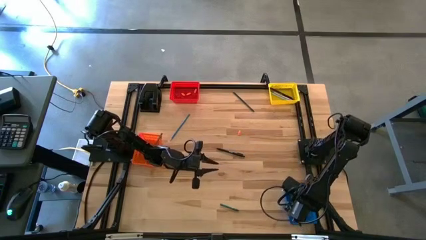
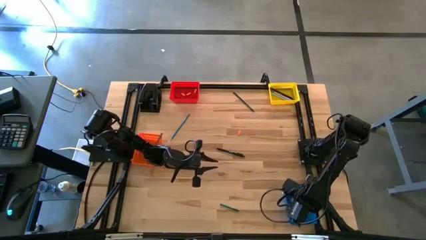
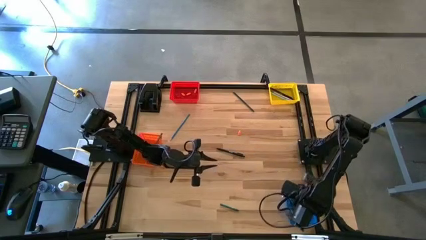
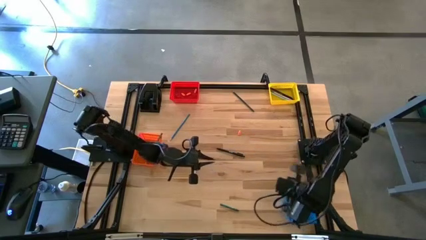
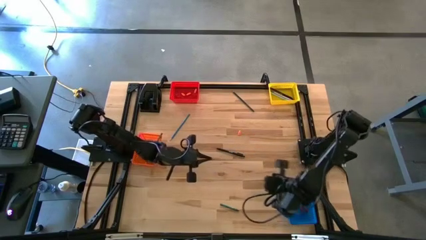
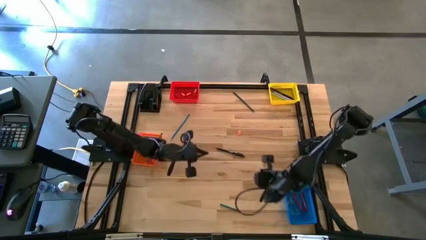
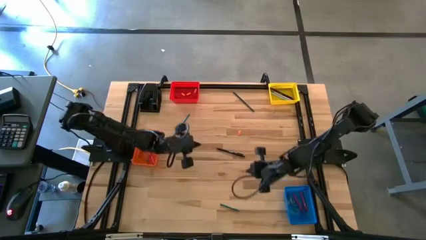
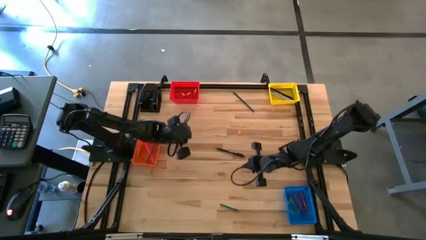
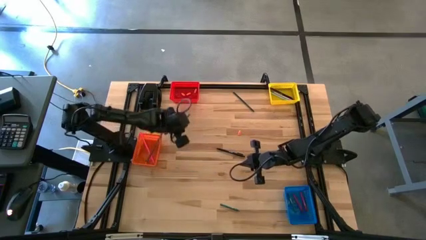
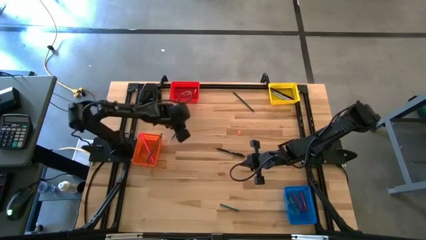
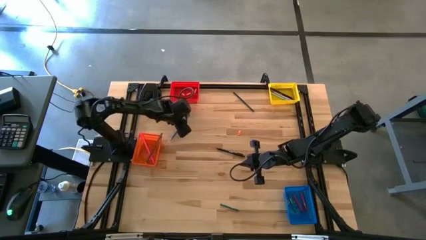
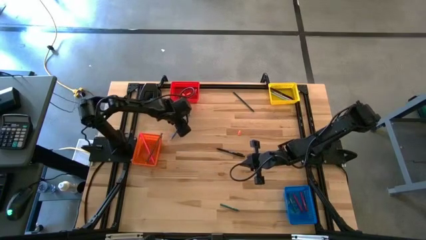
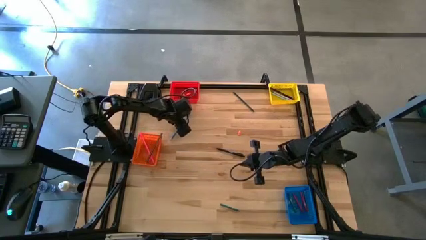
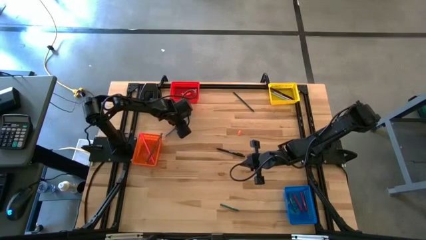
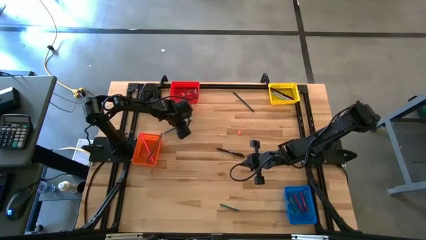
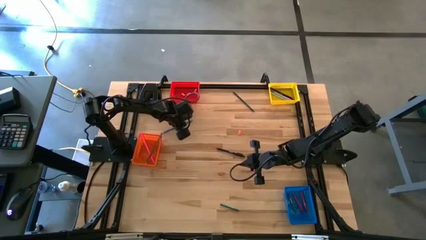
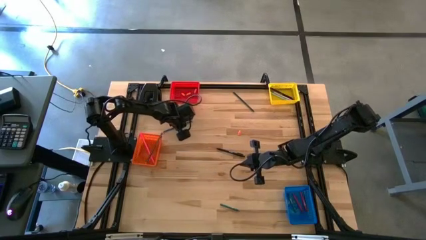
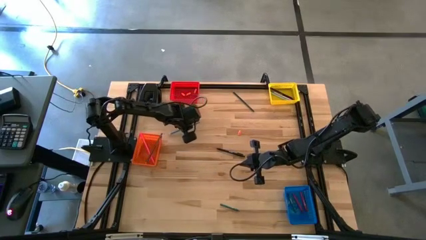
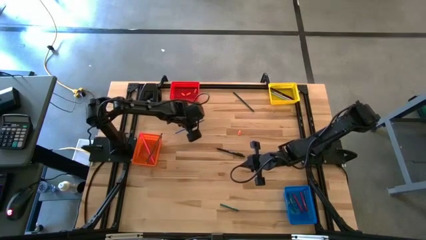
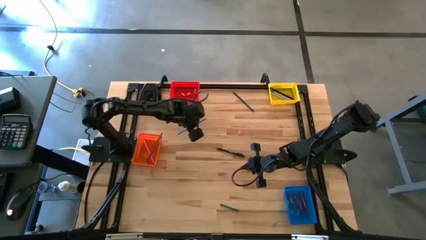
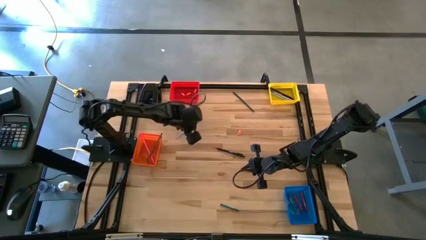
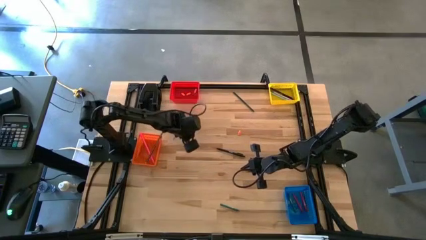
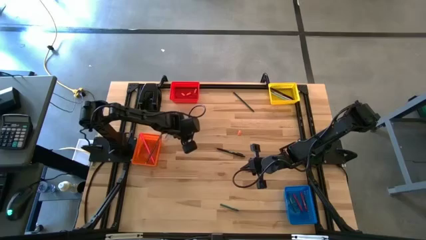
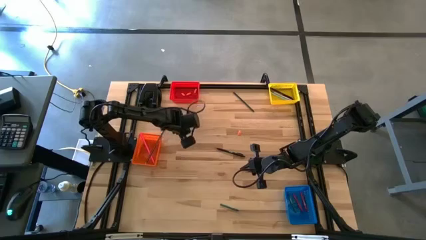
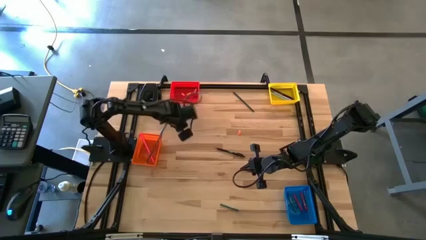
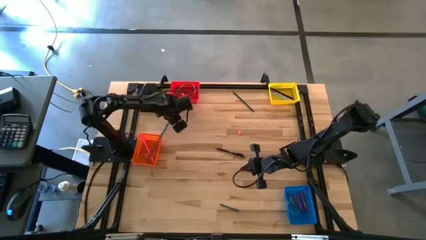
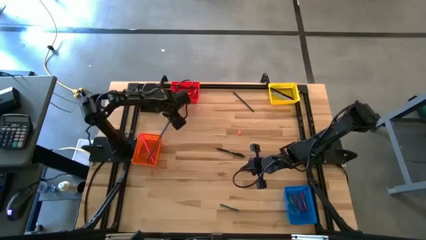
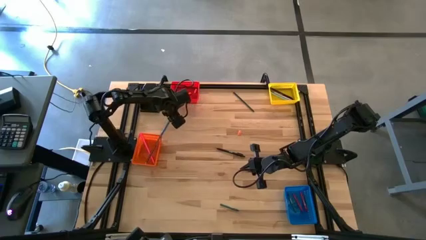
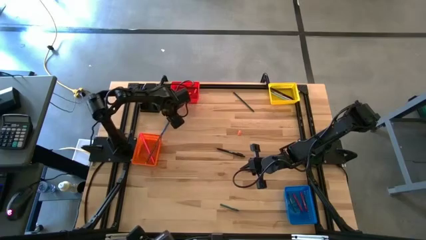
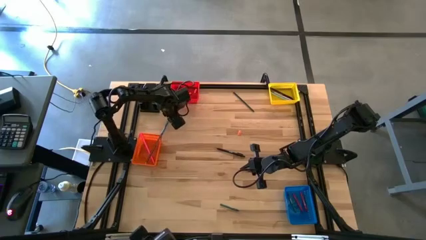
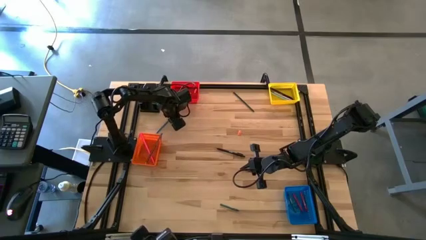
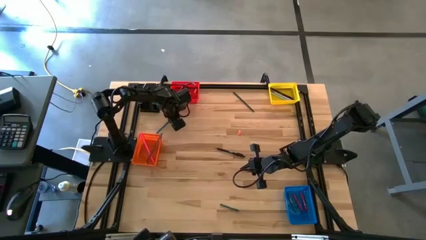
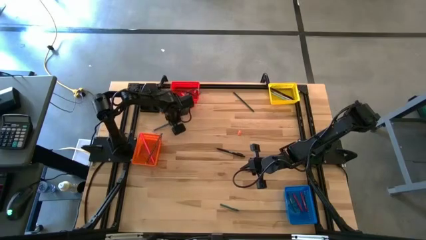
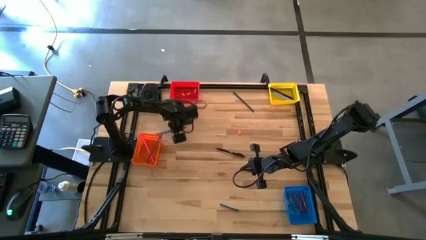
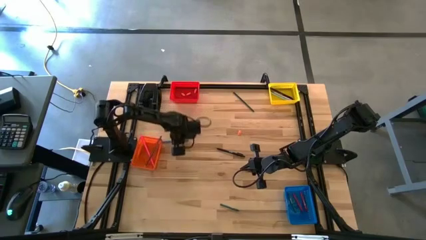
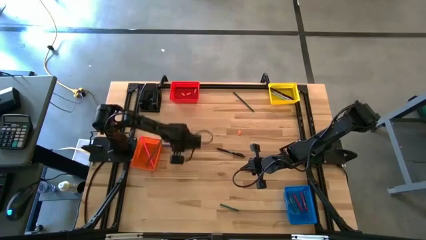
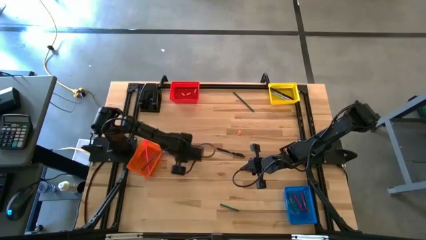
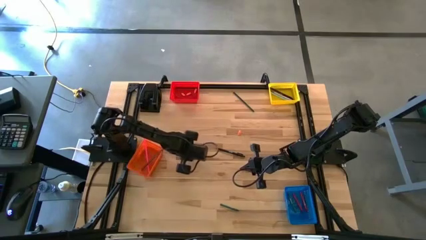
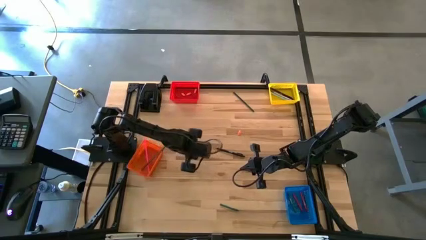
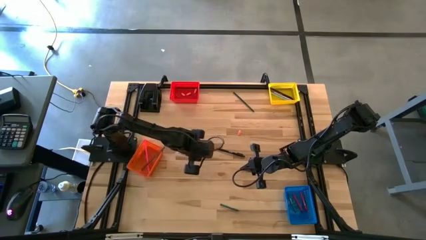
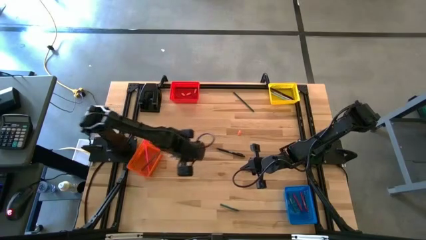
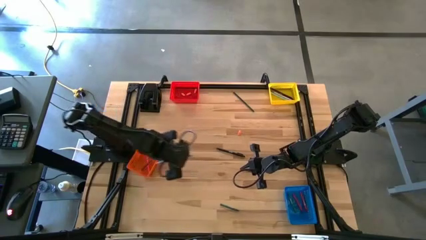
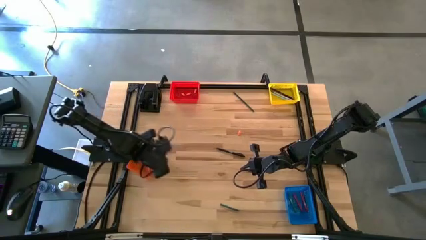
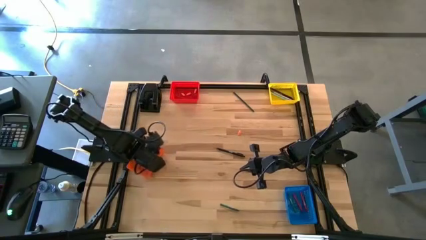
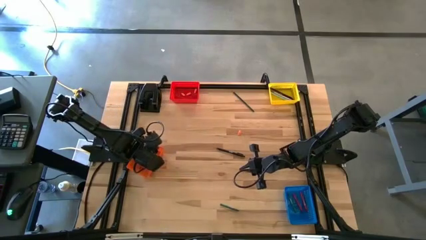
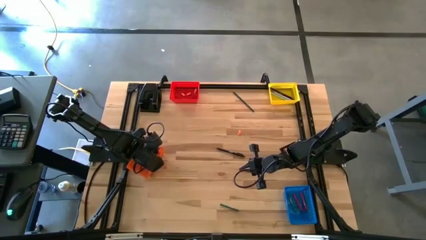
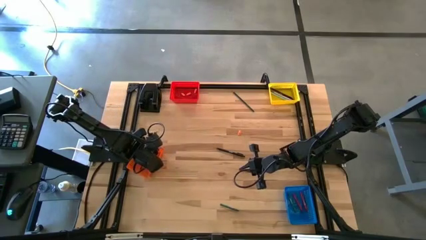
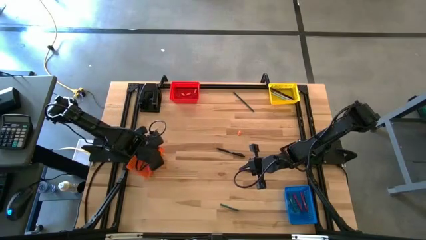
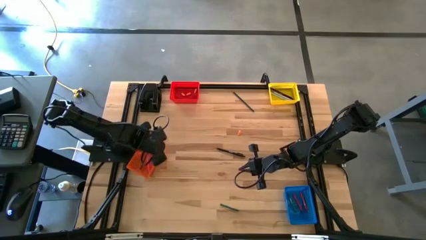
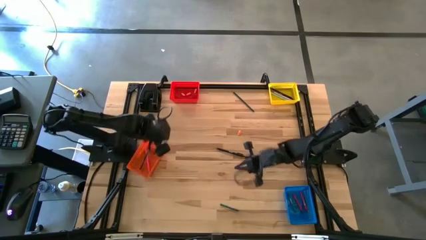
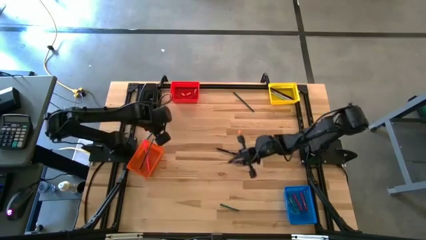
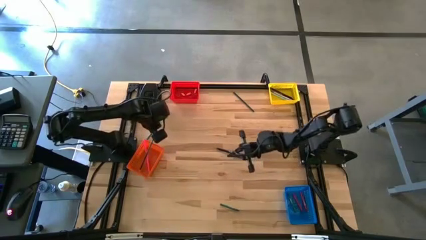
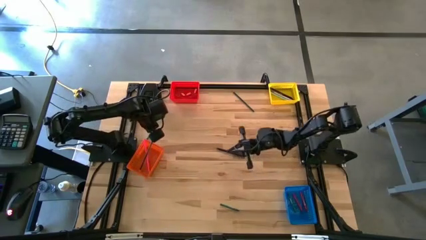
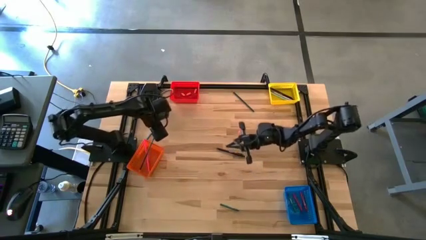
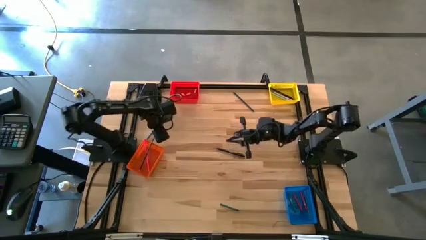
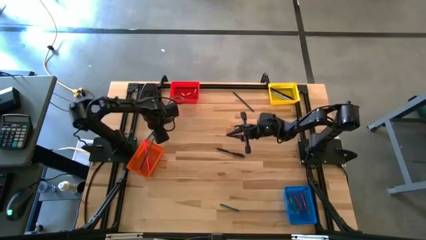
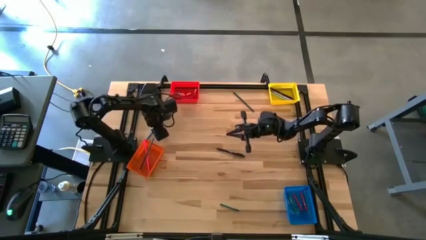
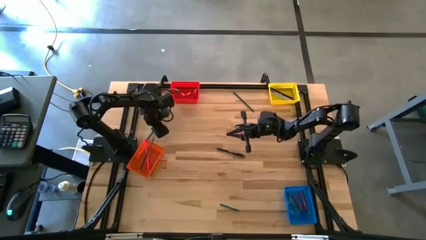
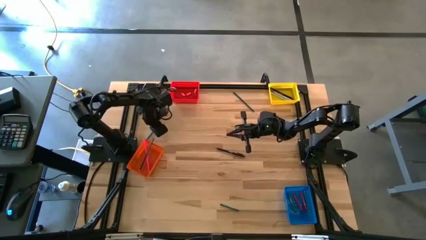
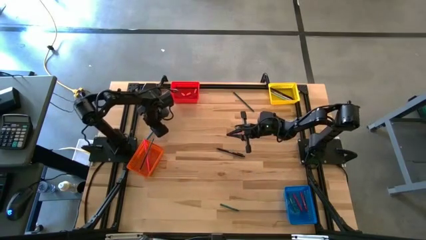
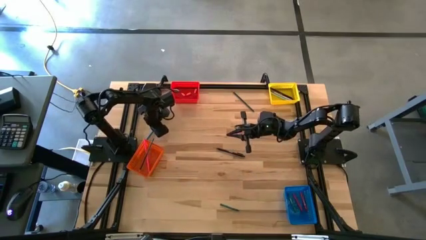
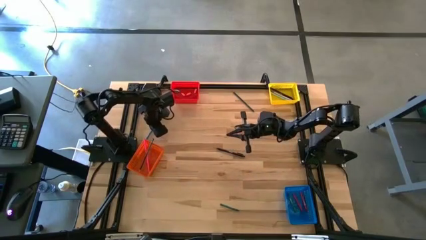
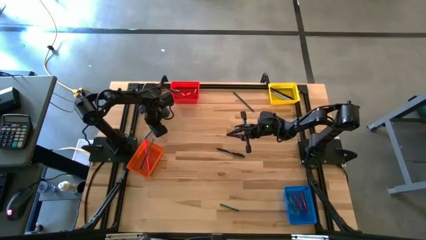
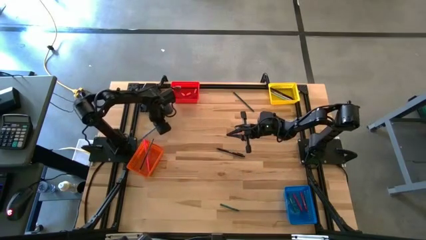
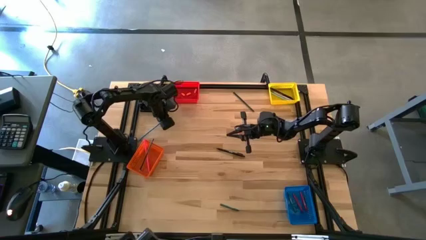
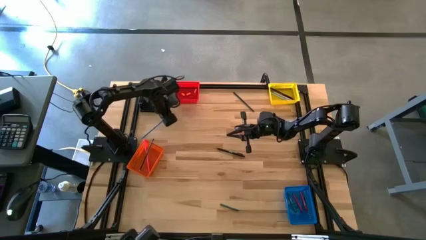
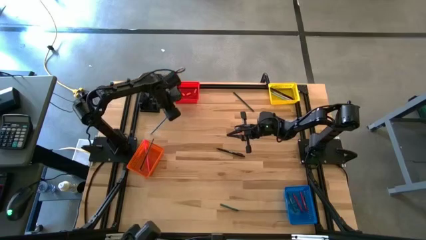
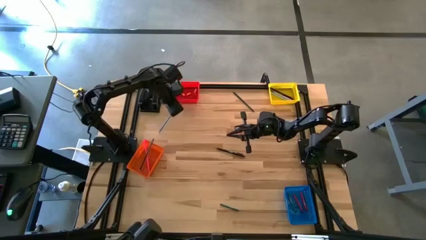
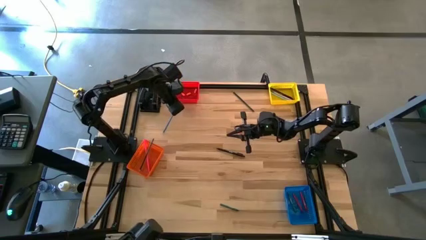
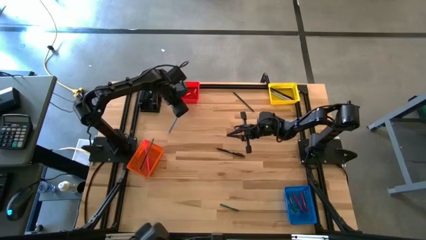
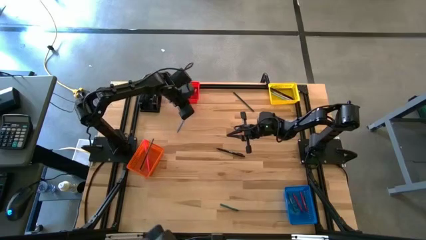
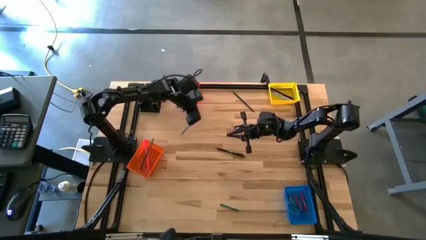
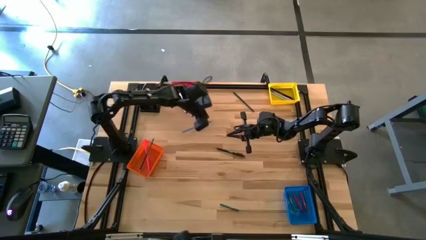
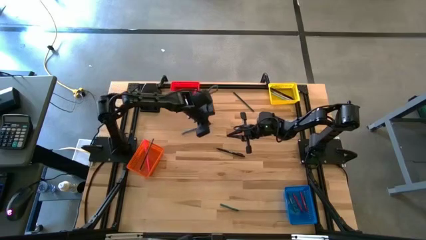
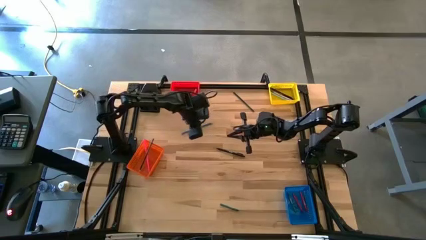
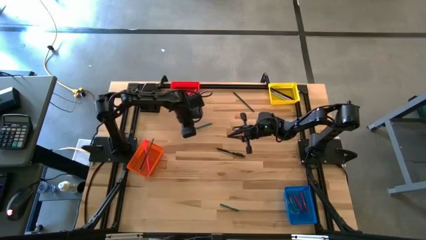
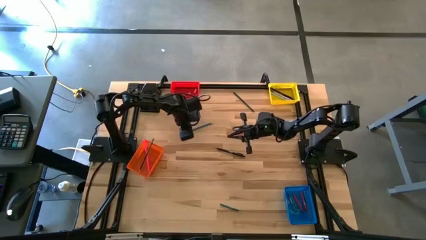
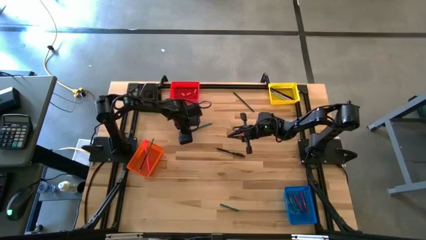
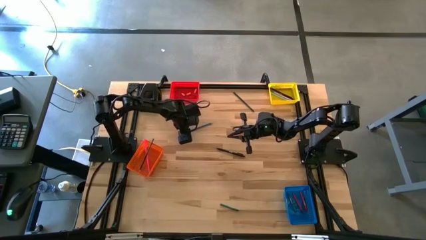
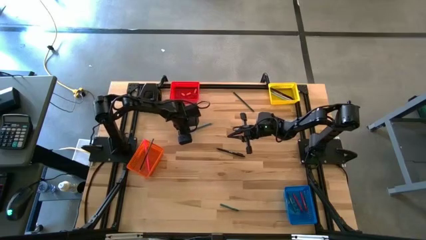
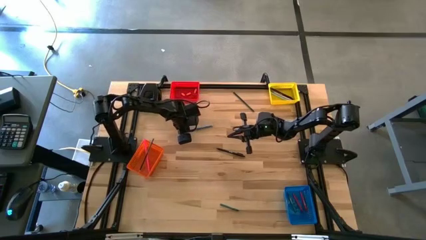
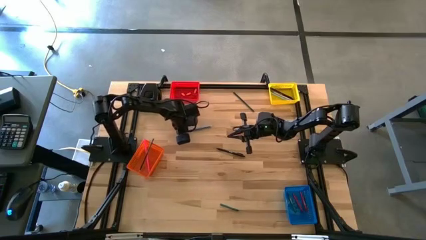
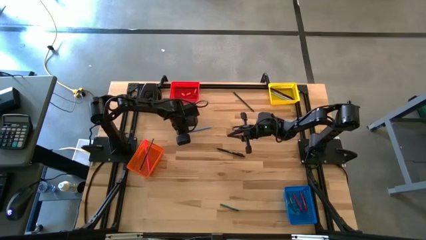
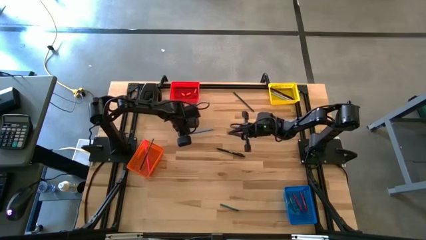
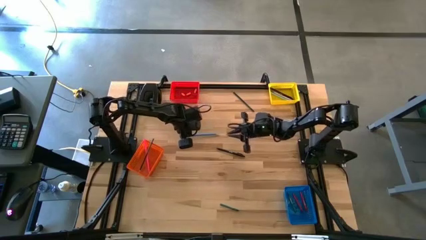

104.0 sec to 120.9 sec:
Task: Sort crayons/erasers/pens/pencils in bins
Put the blue pencil into the orange basket
